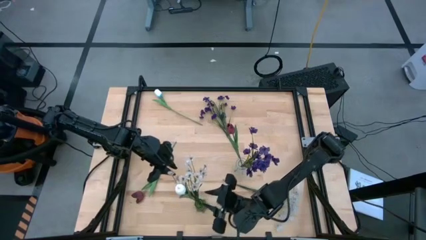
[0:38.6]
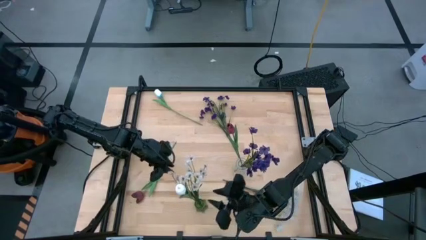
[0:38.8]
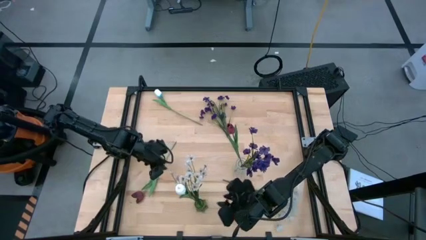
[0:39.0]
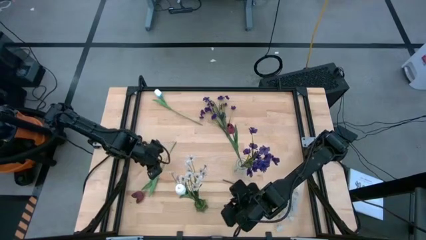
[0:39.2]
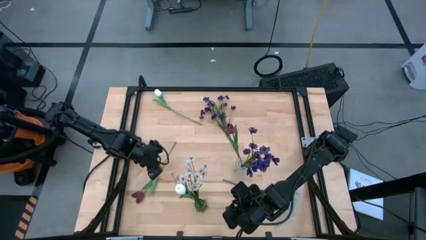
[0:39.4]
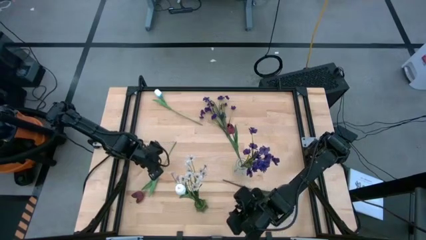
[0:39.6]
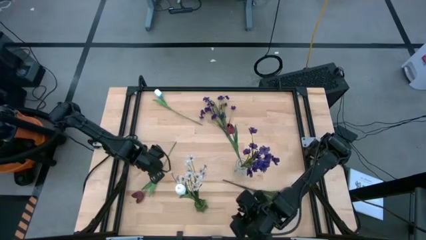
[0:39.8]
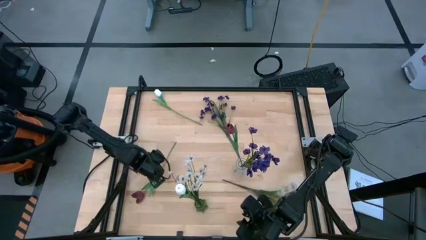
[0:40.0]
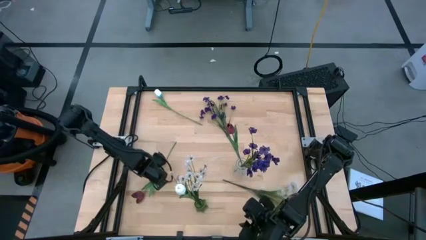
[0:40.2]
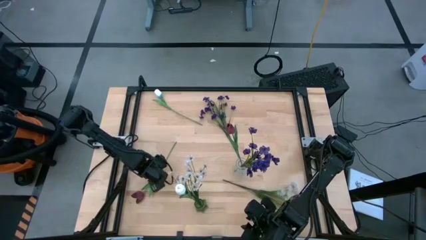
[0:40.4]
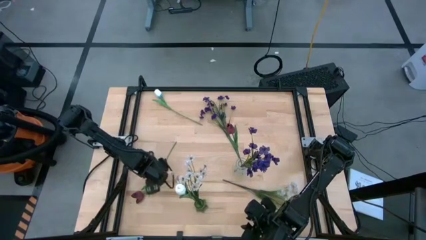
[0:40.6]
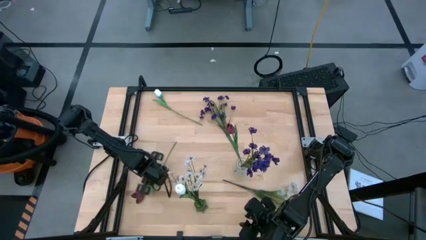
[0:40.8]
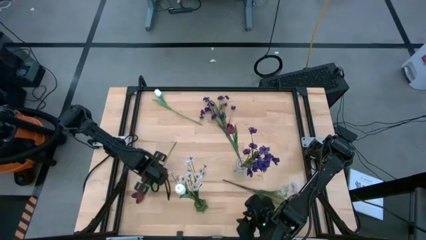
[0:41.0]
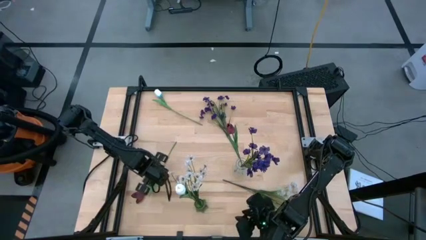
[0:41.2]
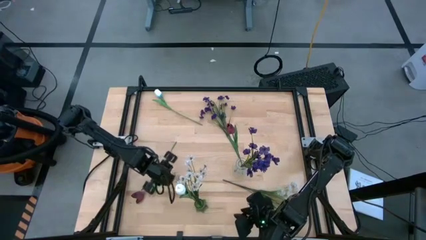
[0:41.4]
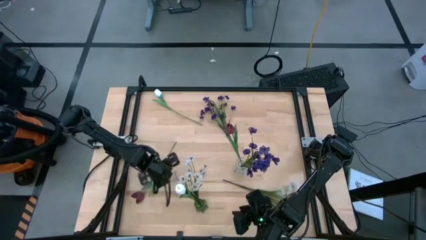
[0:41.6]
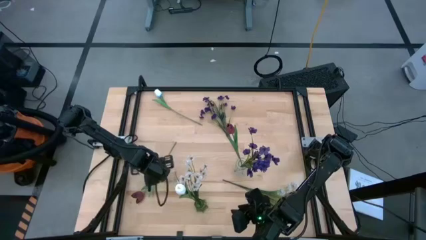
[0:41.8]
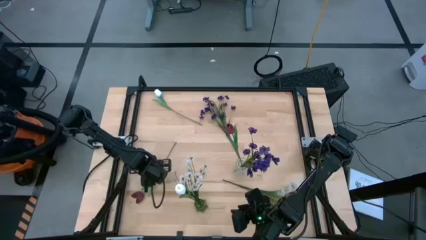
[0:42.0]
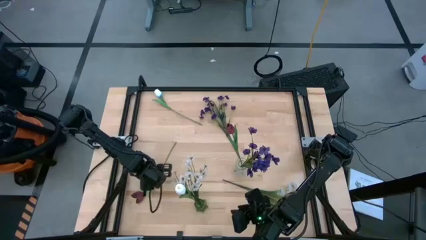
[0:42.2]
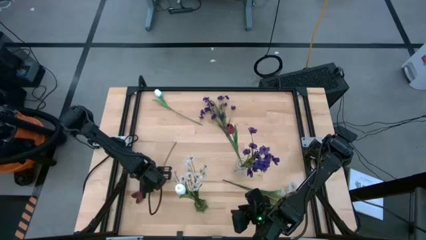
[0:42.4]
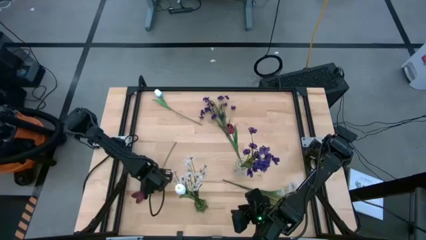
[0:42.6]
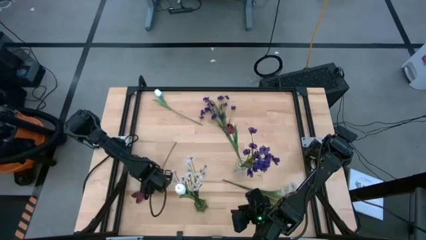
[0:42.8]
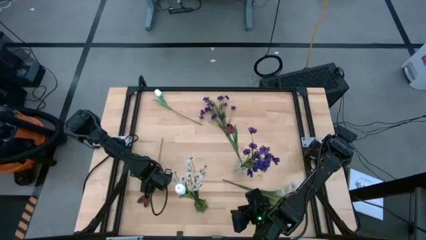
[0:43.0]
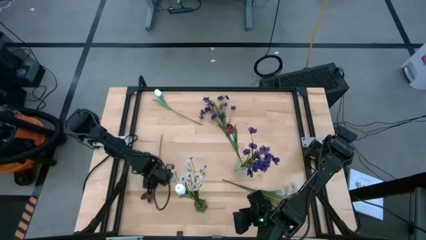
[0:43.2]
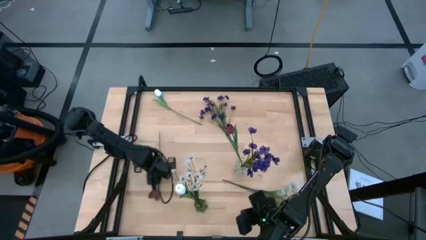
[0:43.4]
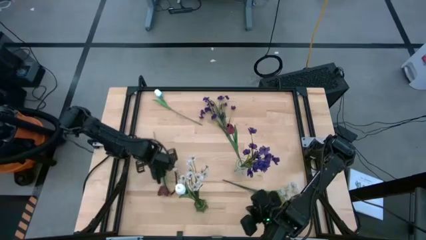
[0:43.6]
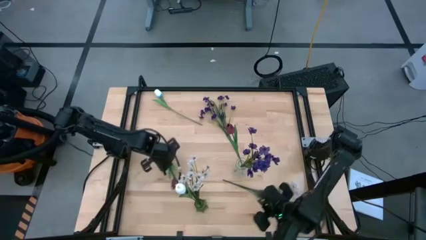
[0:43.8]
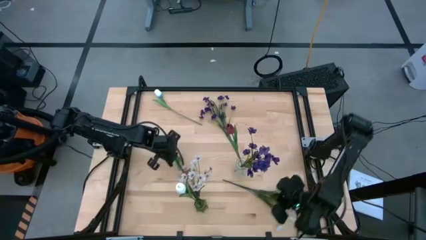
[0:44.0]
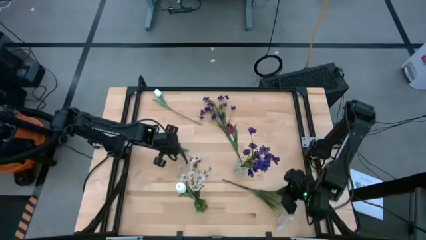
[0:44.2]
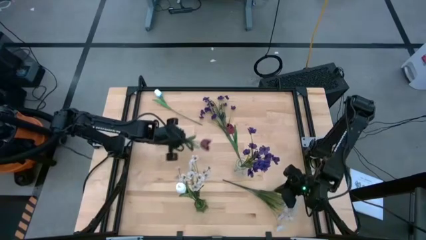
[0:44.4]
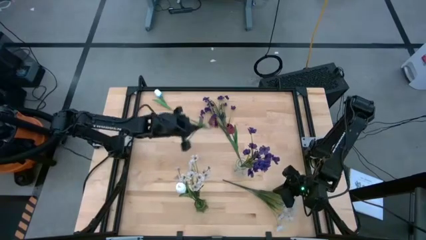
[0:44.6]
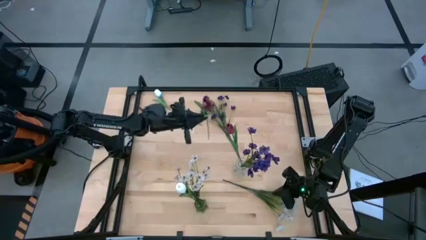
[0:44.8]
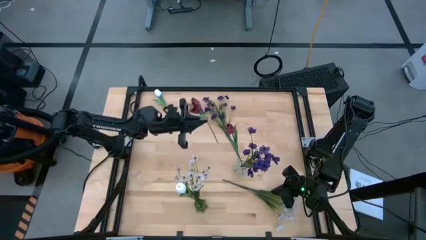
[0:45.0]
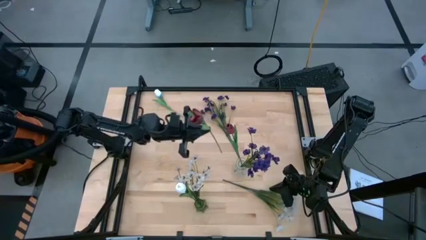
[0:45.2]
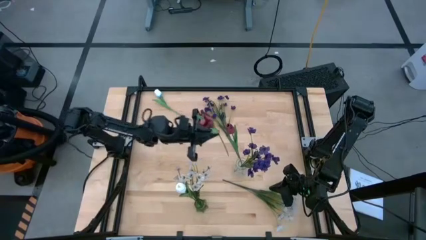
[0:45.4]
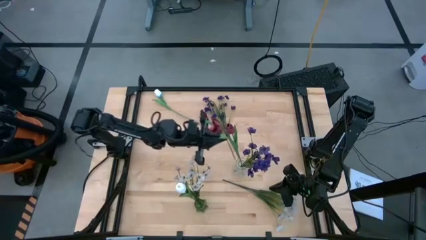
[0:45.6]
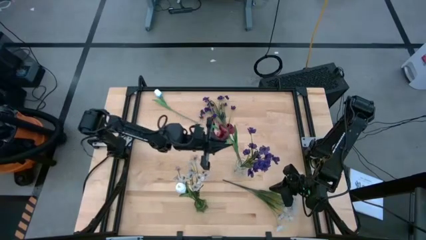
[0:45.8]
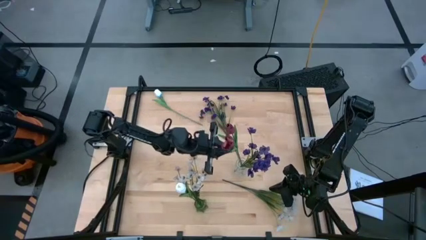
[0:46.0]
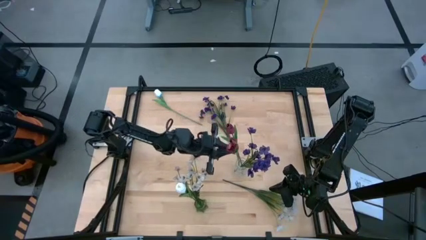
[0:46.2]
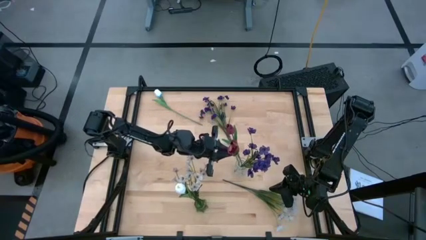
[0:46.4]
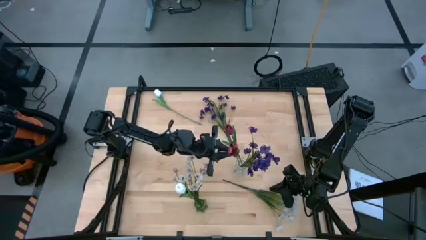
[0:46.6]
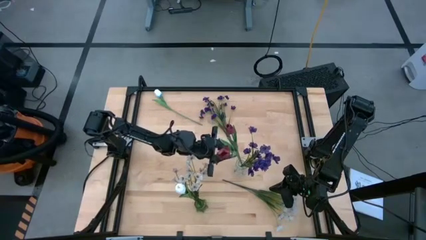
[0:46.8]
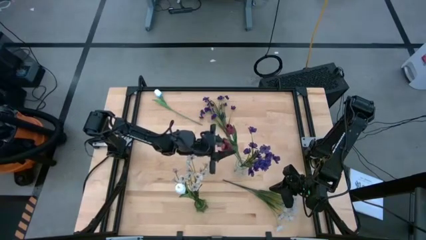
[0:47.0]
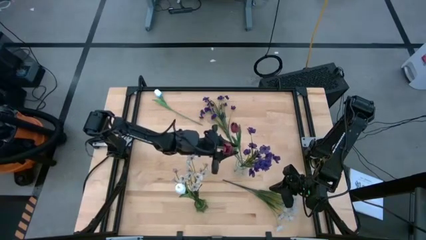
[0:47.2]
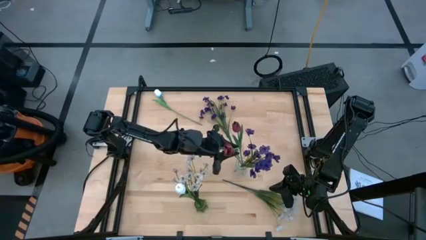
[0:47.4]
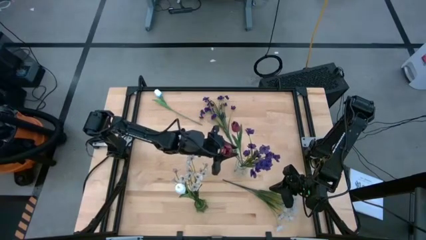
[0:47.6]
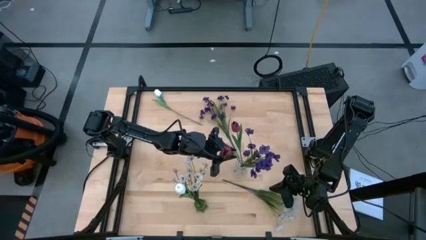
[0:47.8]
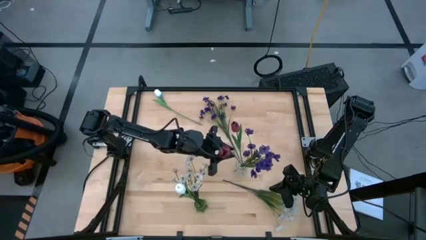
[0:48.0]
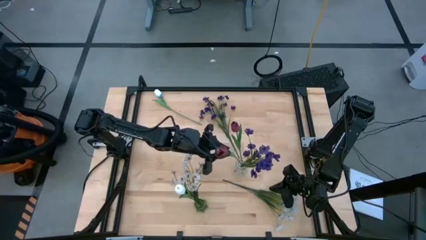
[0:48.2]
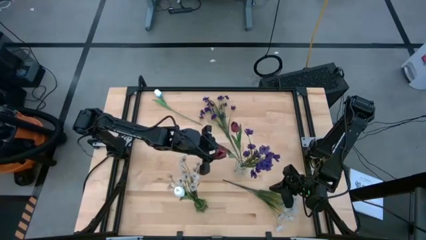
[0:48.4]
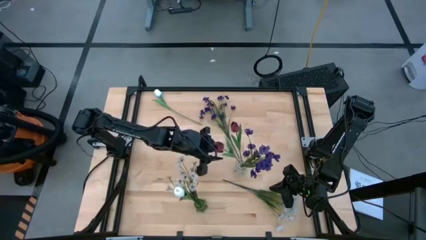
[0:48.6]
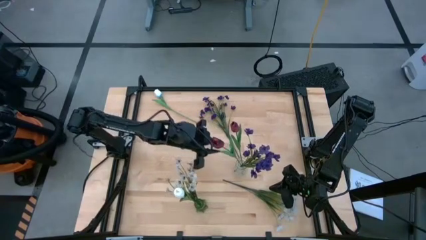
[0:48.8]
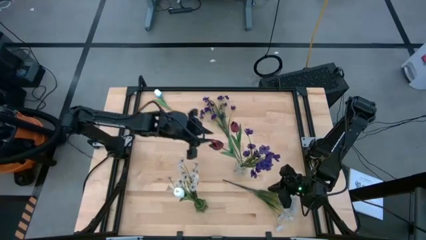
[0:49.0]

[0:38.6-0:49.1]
Task: Sort flowers into vase by color
Put the red tulip into the transparent vase
